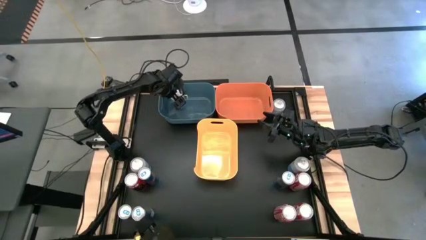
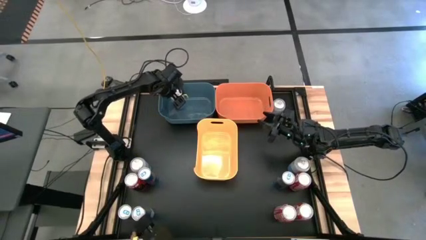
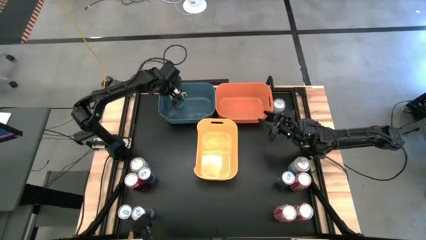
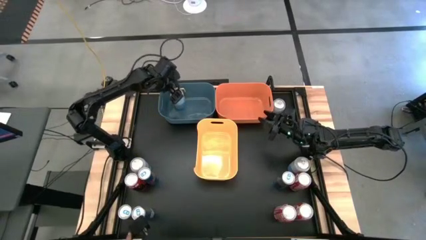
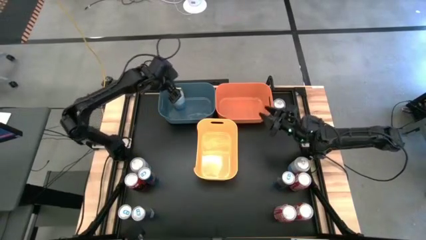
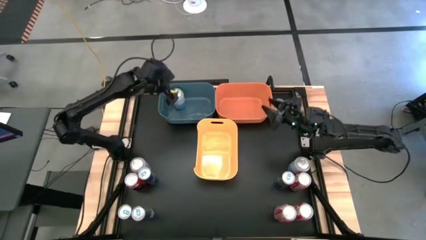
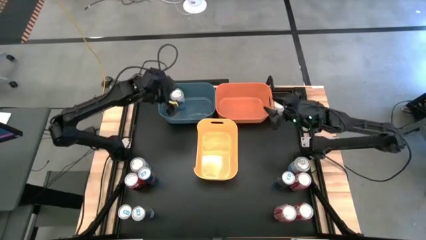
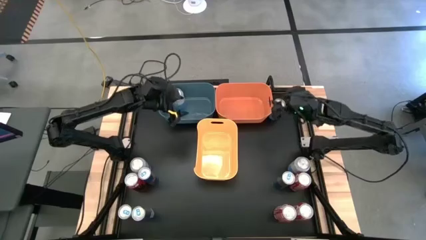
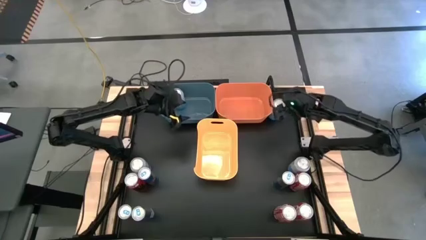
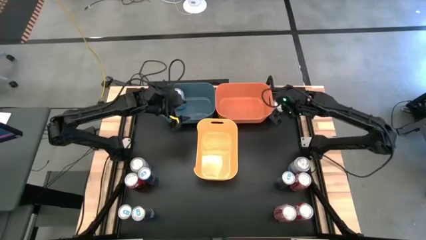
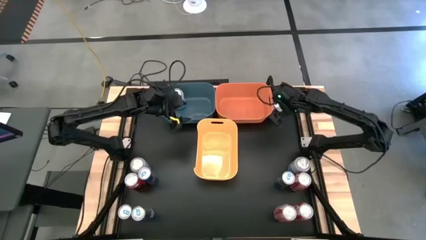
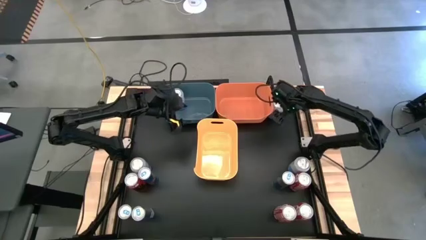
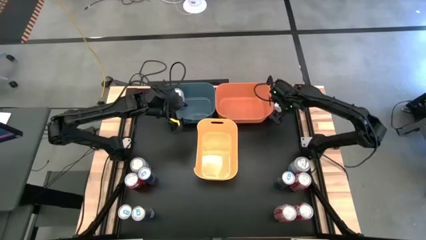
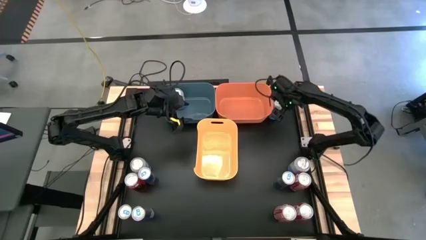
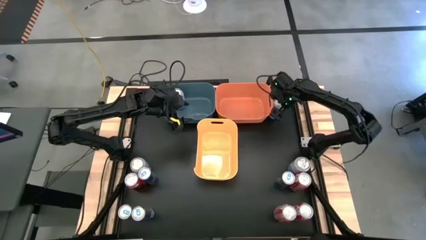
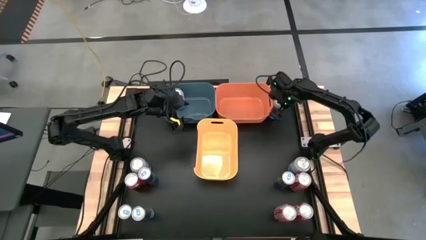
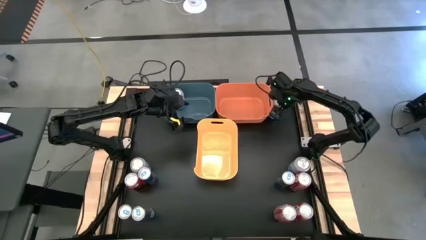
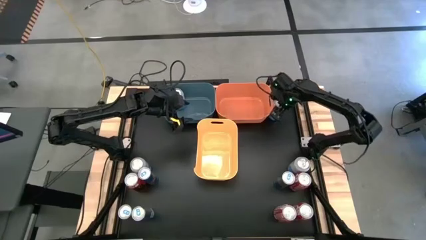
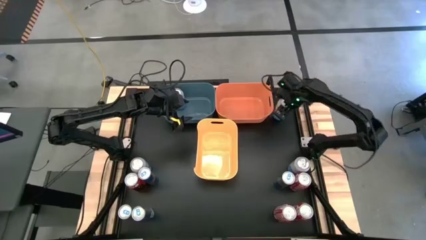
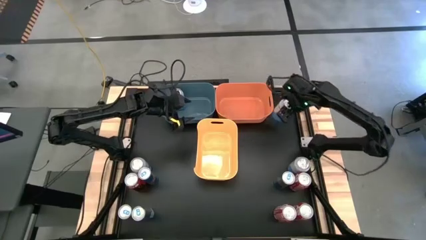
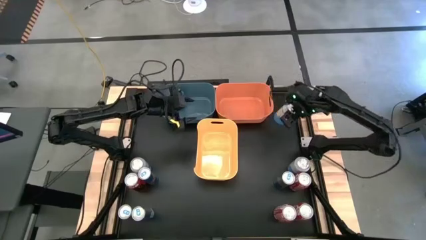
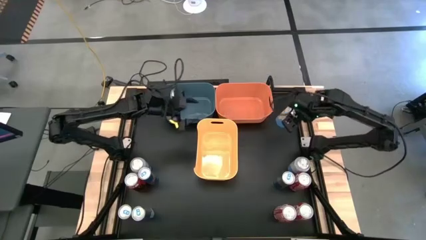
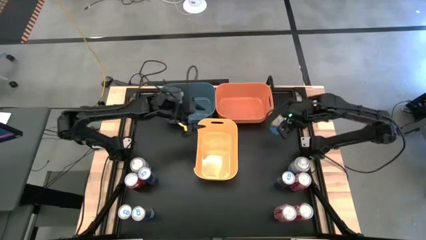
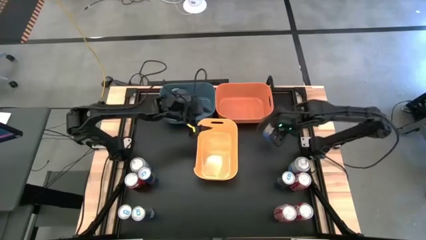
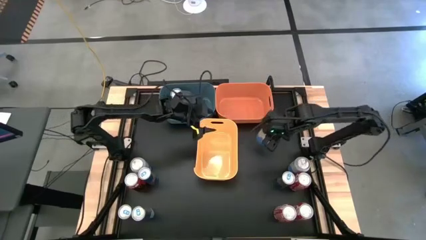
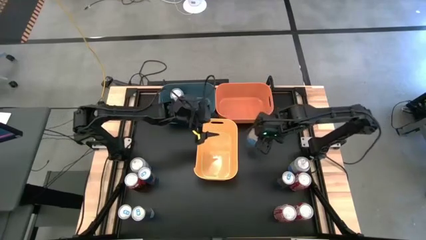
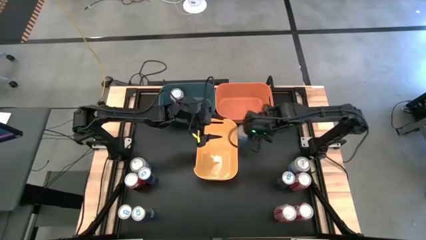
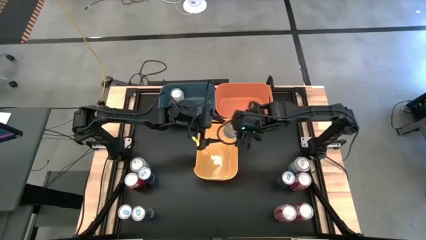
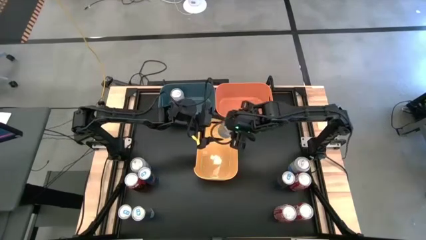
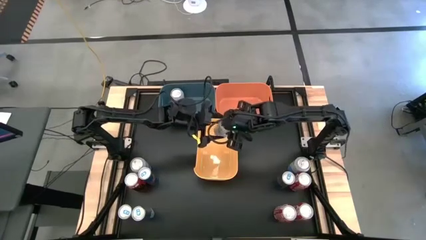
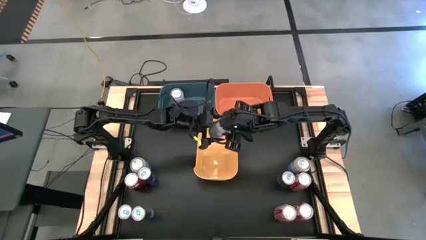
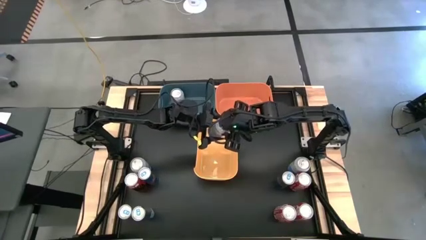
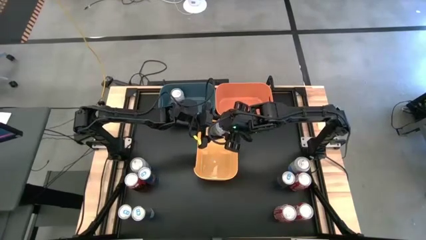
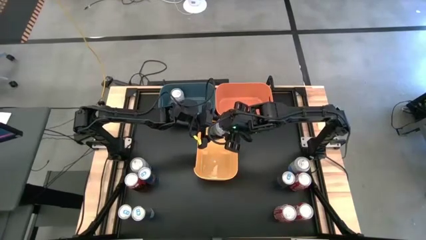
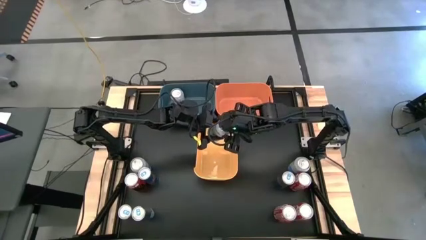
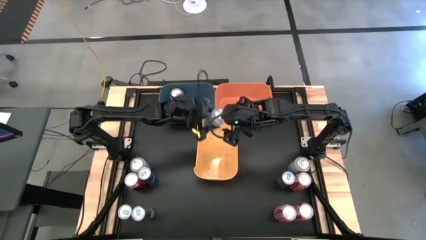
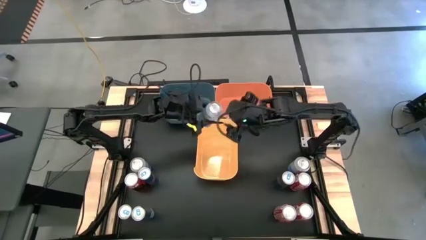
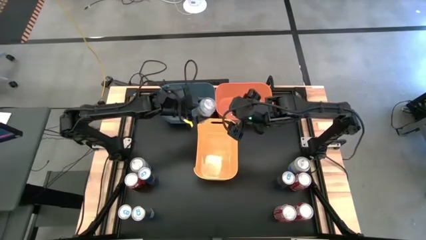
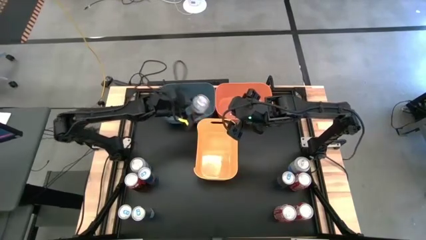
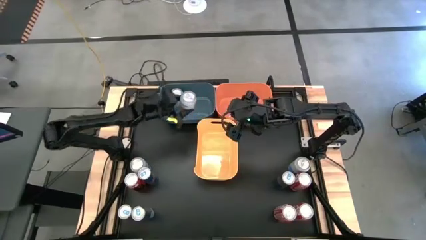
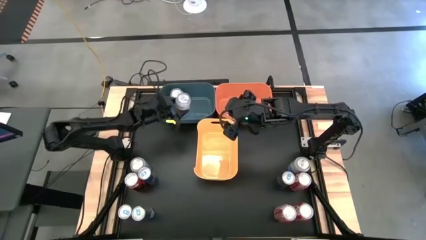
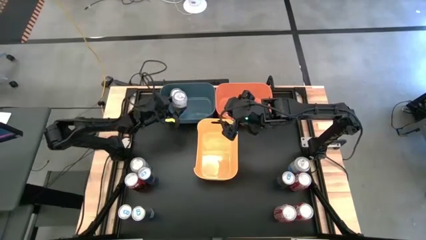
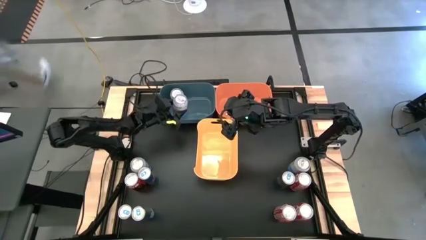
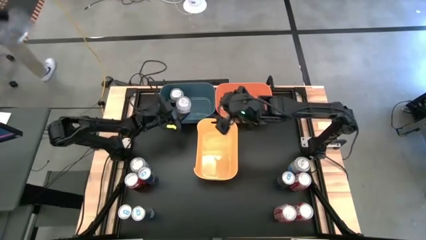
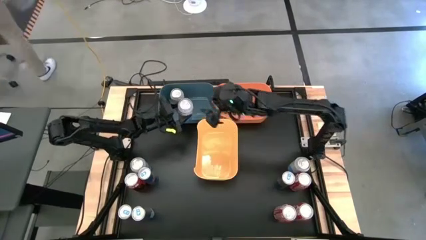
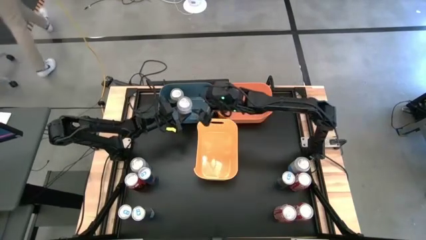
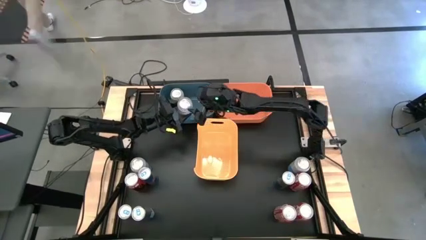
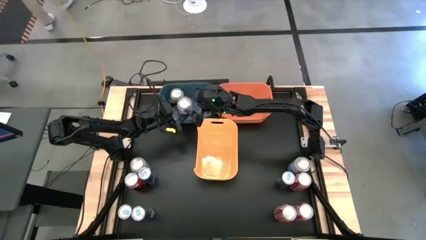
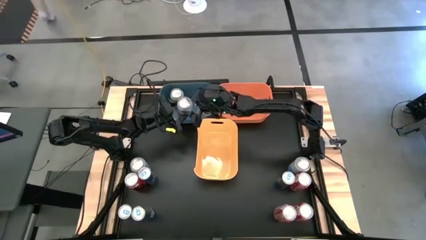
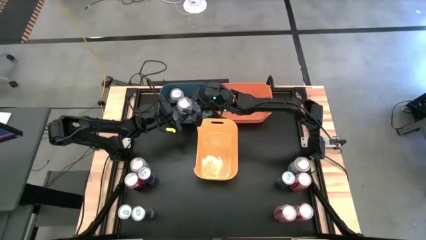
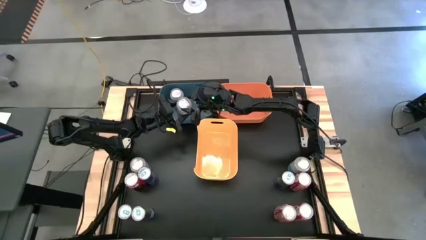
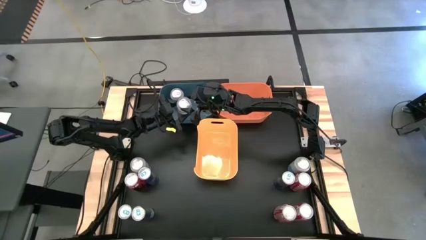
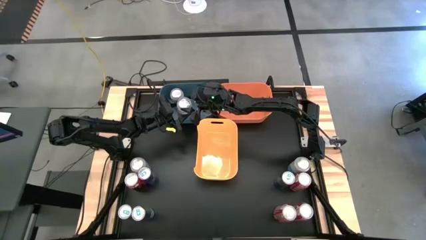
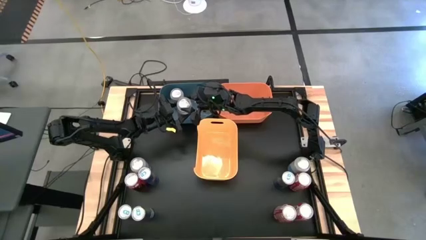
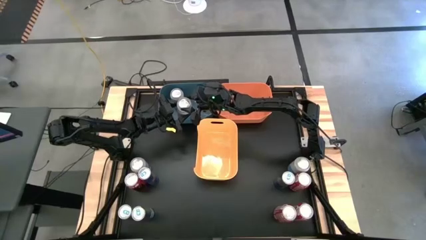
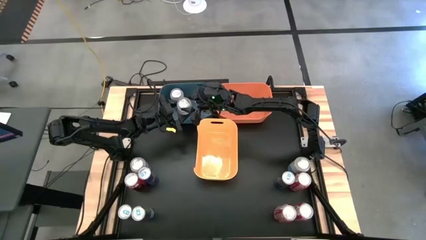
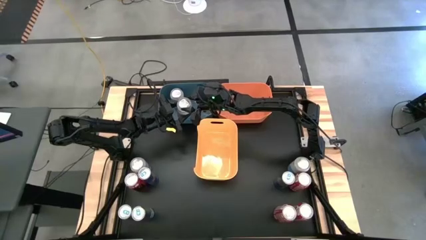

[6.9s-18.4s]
Task: Sort soda cans
Put the top blue-white soda can into the blue bin
